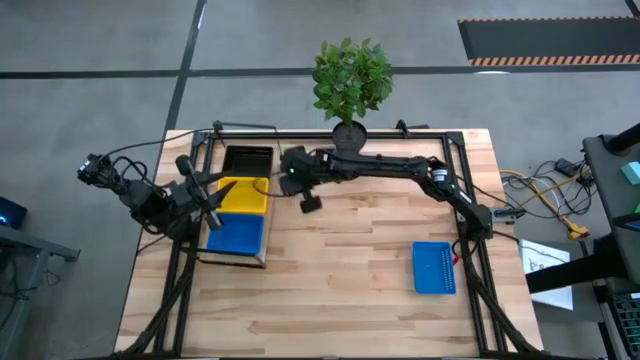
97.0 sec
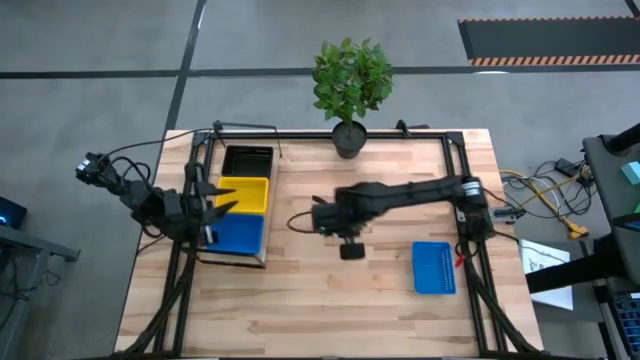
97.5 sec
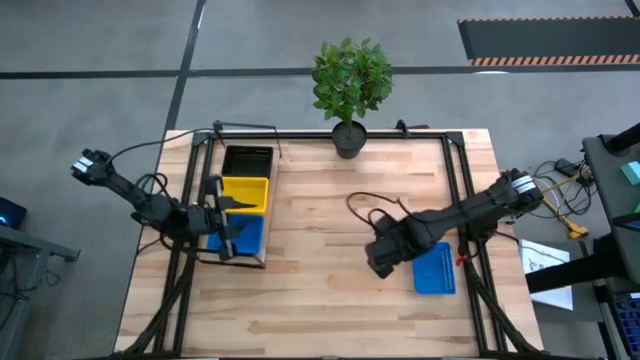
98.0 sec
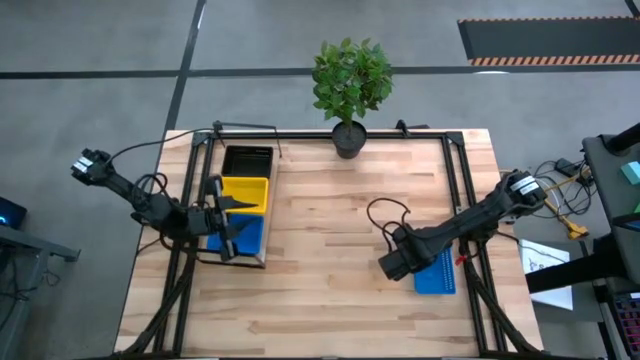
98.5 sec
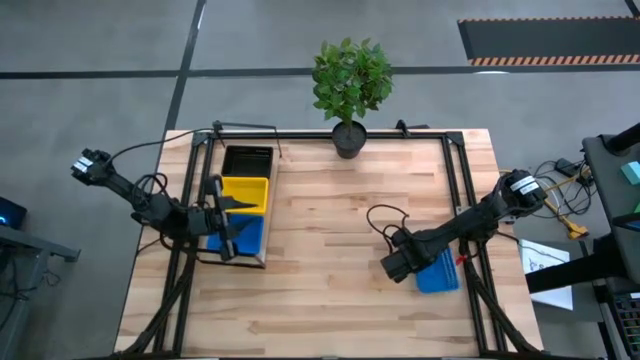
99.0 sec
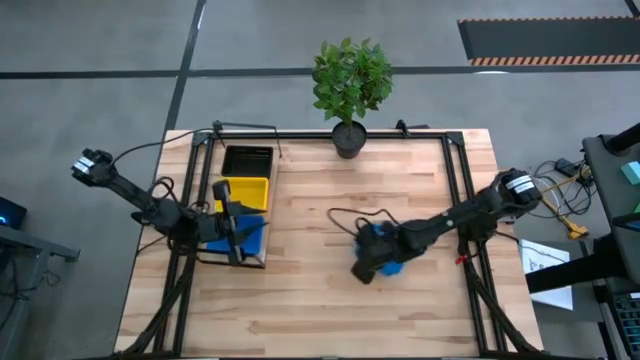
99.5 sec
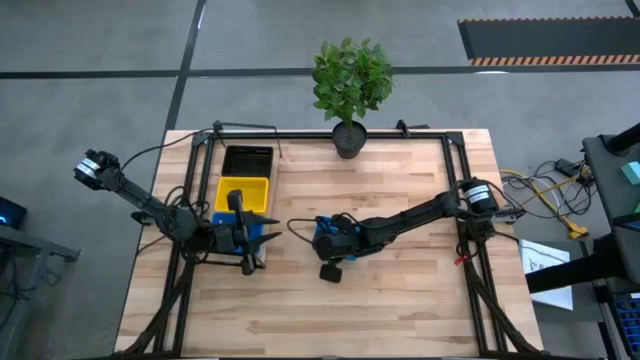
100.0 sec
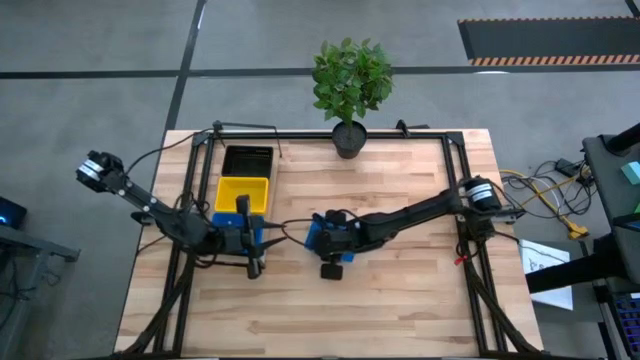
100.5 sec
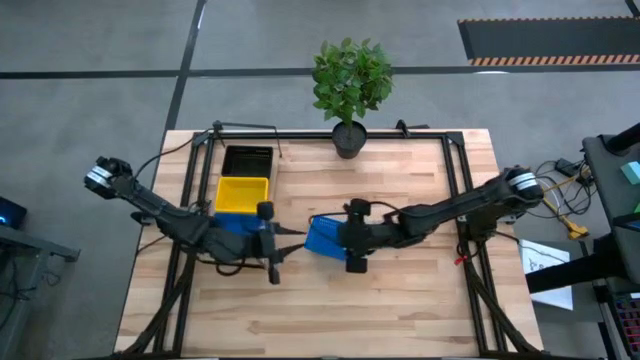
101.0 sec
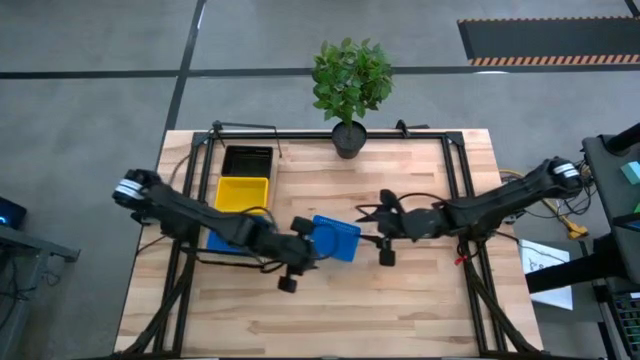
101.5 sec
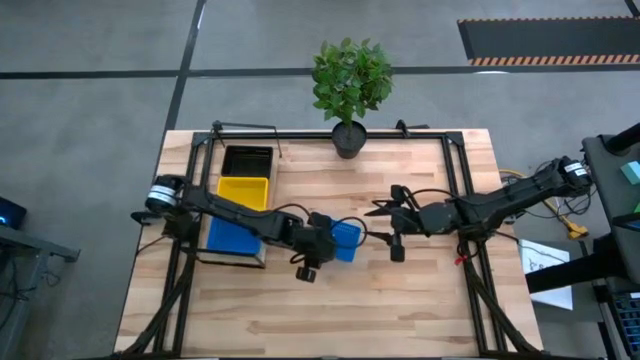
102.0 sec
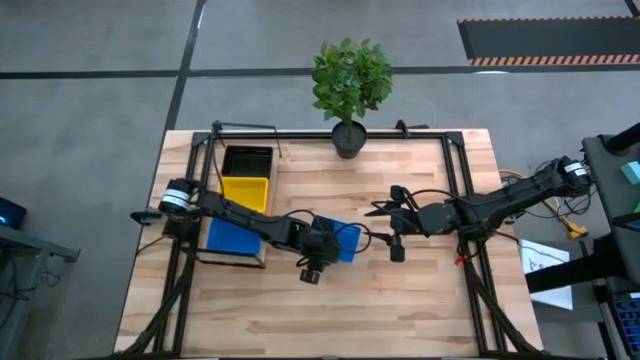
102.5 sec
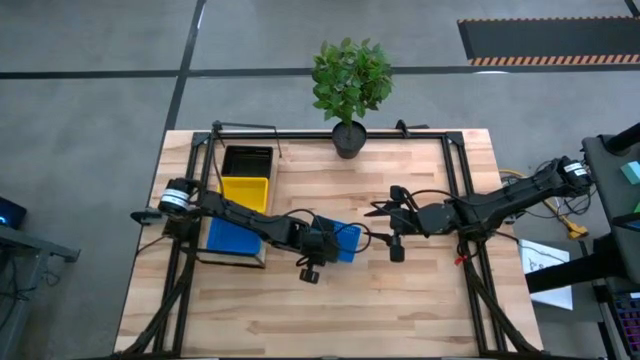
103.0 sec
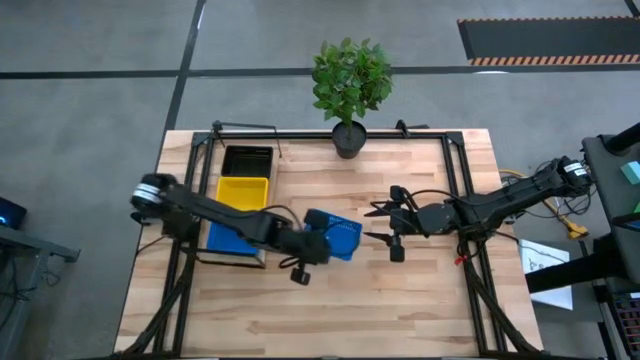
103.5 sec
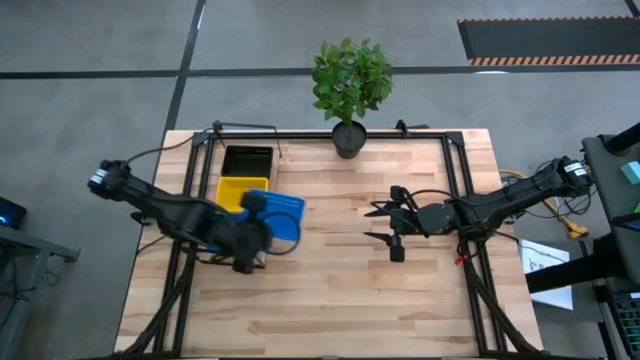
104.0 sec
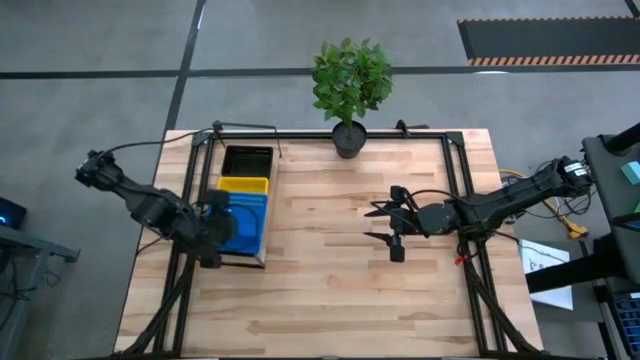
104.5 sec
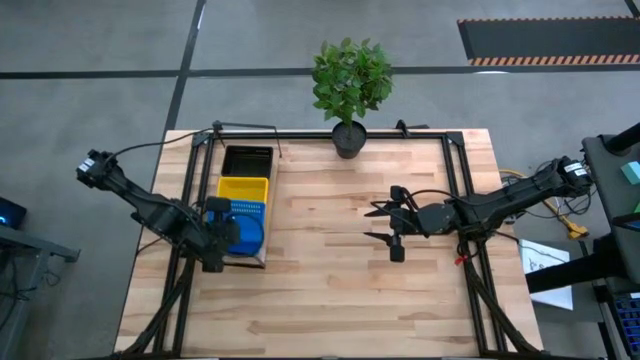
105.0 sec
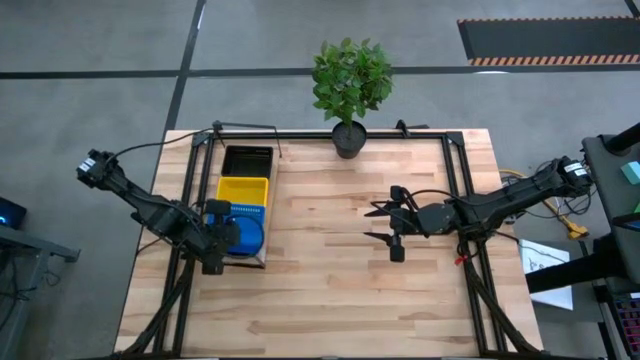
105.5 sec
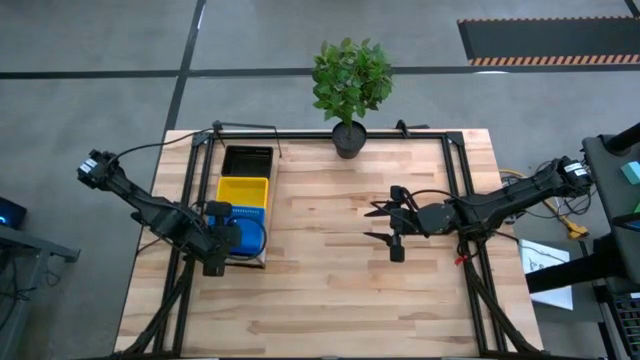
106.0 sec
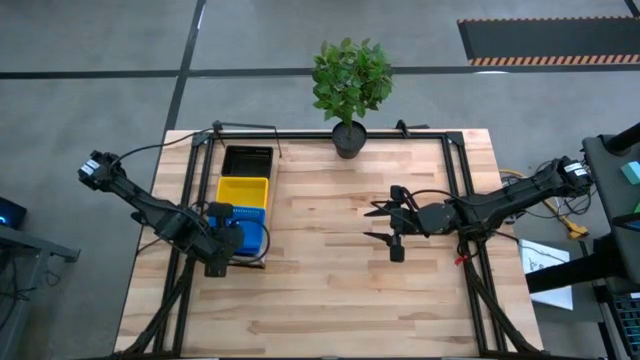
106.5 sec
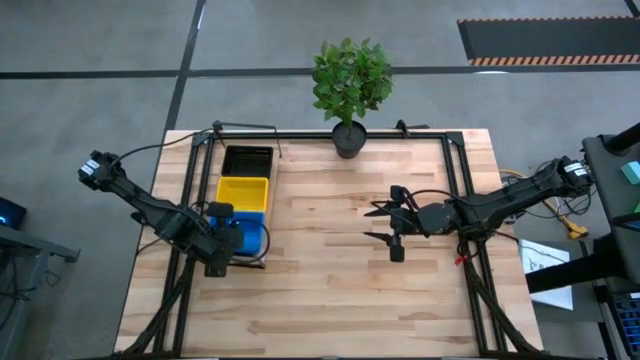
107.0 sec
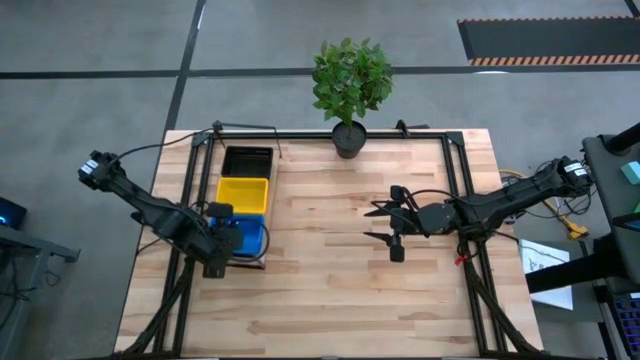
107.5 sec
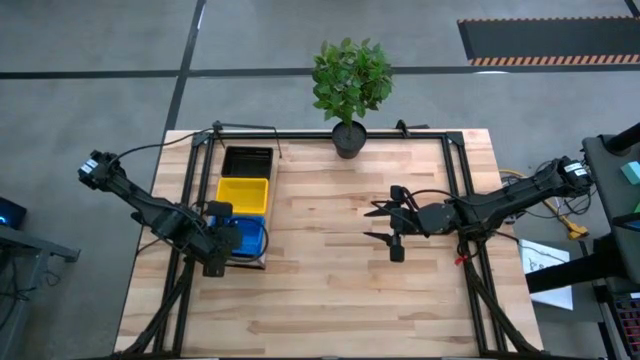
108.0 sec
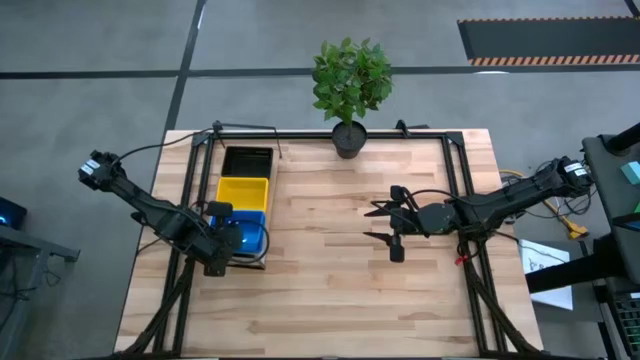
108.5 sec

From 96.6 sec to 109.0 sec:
Stack the blue basket on top of the blue basket on the shelf

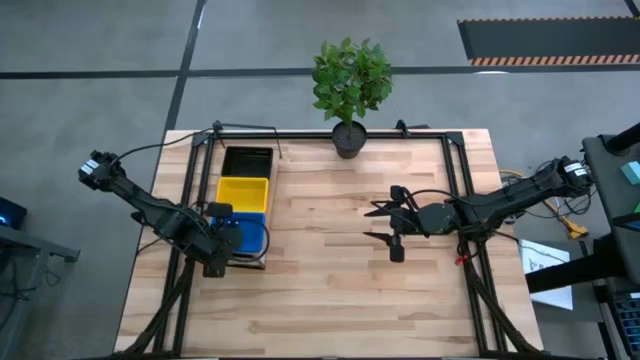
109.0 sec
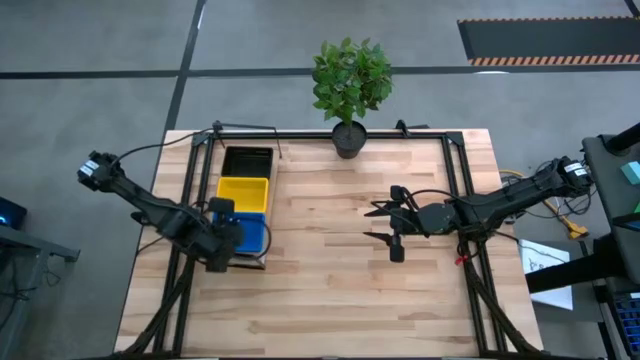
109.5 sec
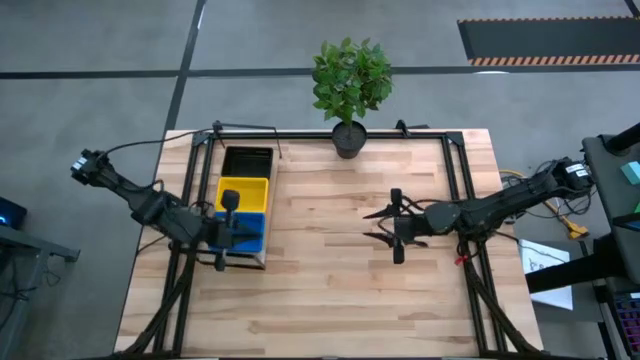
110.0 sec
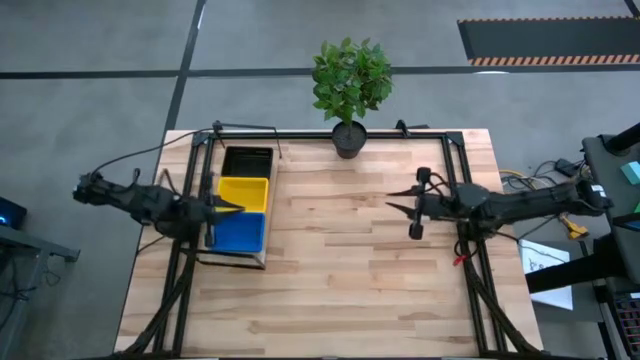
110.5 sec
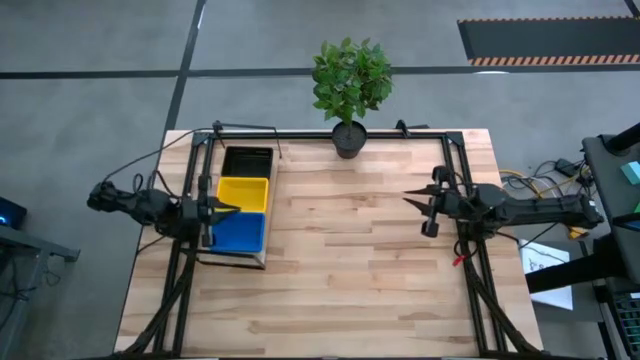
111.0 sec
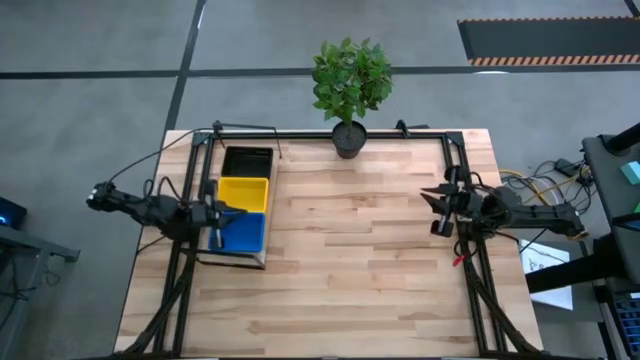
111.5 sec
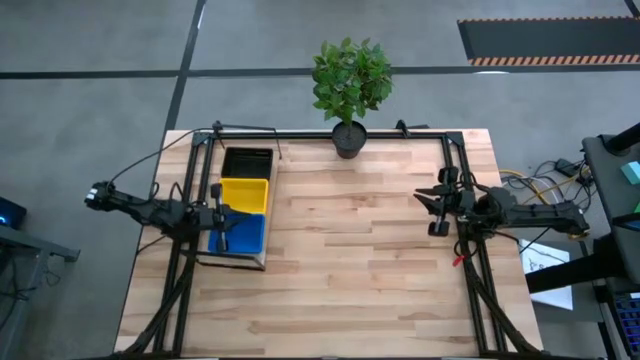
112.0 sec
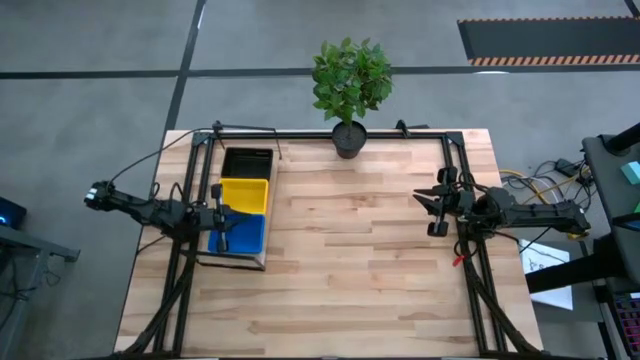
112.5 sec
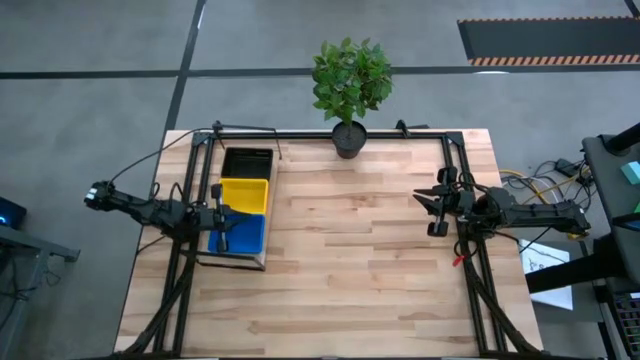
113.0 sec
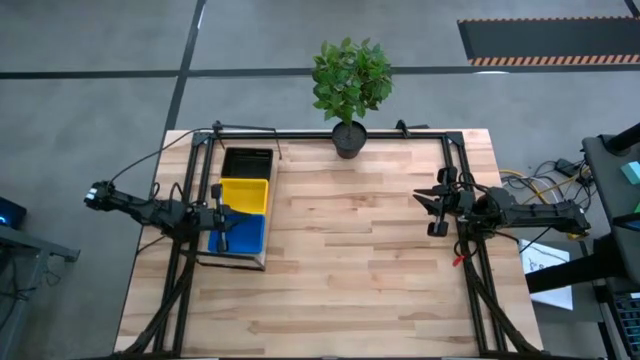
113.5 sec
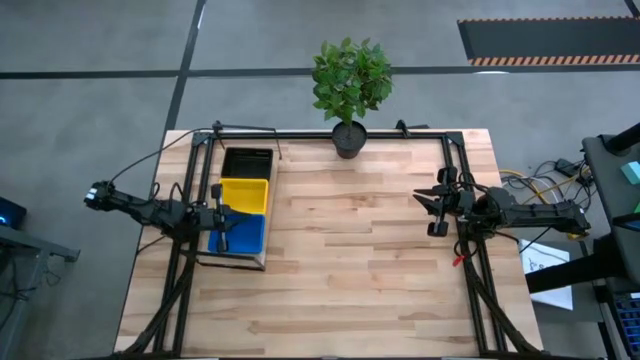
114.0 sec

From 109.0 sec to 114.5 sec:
Return to Home Position
